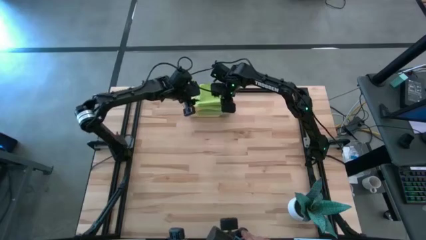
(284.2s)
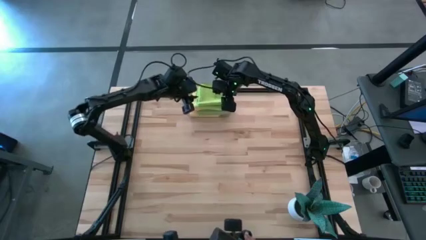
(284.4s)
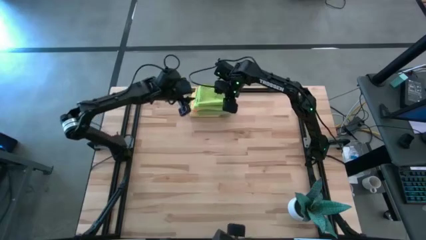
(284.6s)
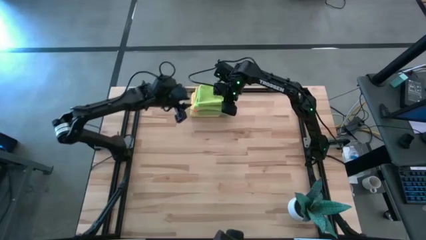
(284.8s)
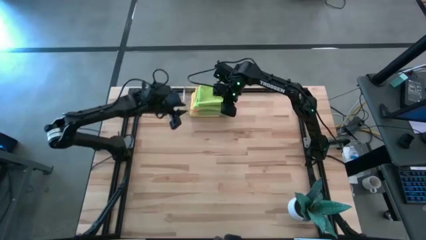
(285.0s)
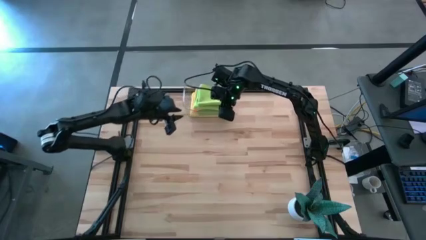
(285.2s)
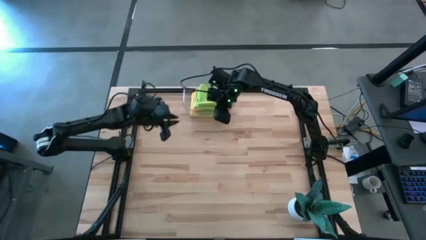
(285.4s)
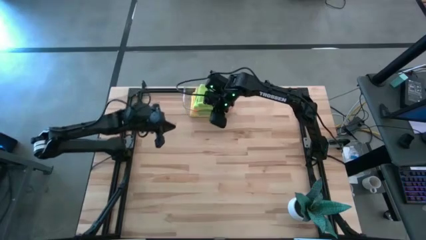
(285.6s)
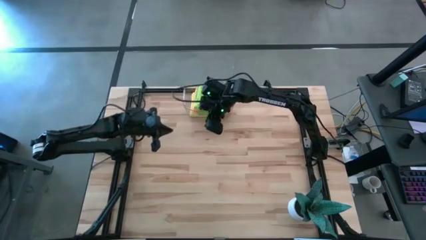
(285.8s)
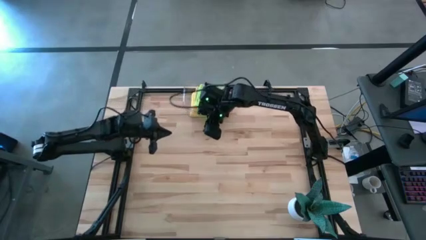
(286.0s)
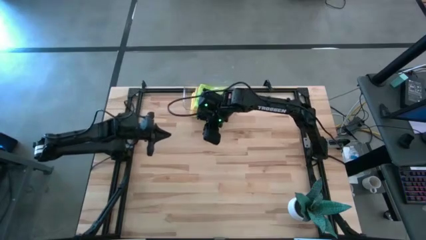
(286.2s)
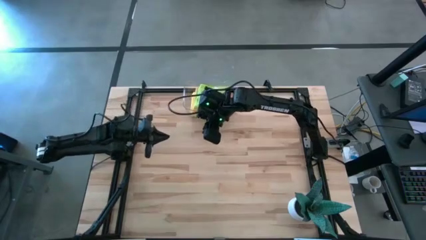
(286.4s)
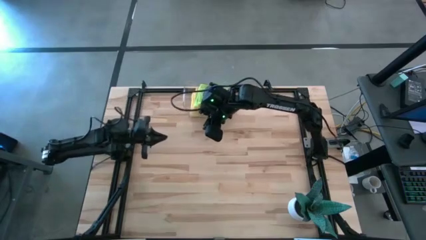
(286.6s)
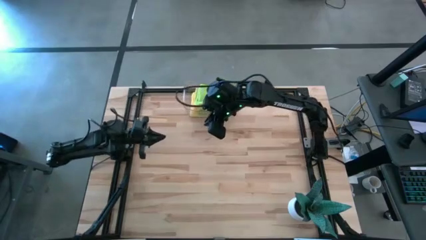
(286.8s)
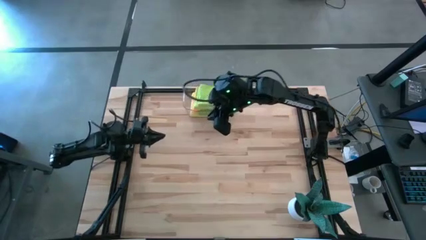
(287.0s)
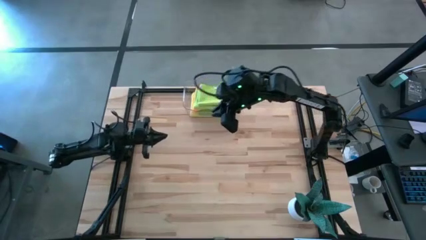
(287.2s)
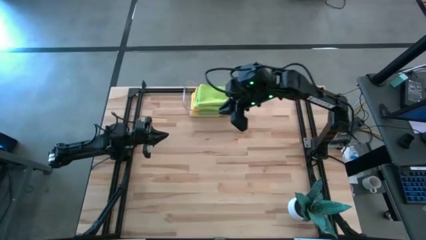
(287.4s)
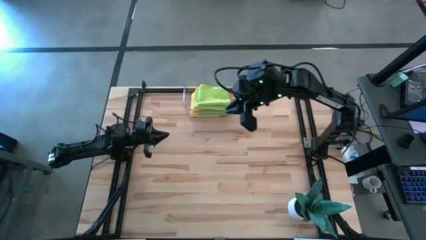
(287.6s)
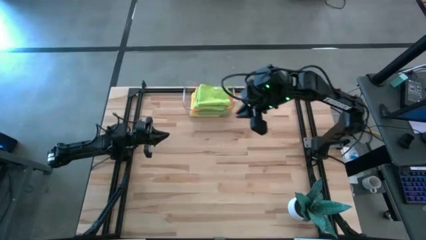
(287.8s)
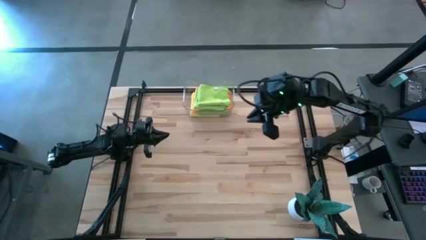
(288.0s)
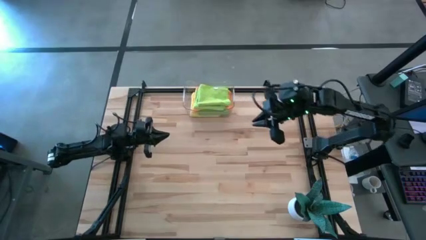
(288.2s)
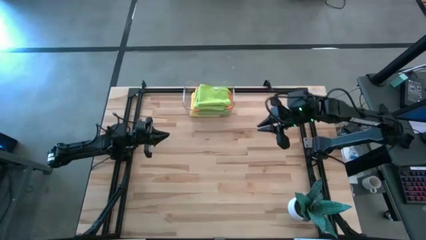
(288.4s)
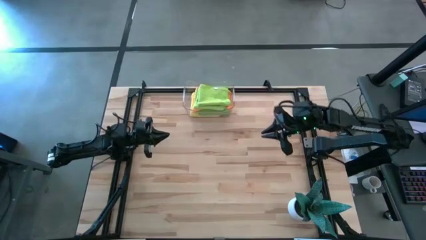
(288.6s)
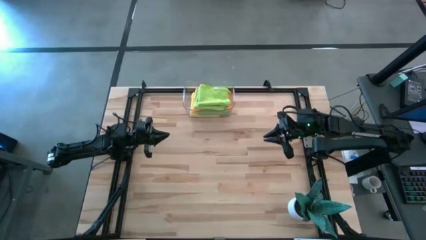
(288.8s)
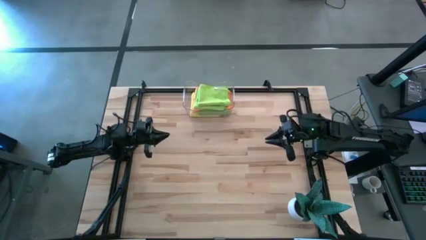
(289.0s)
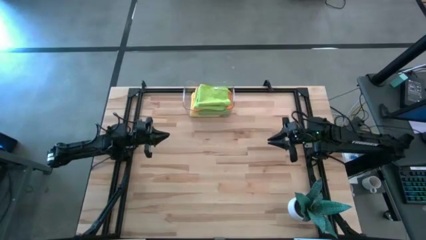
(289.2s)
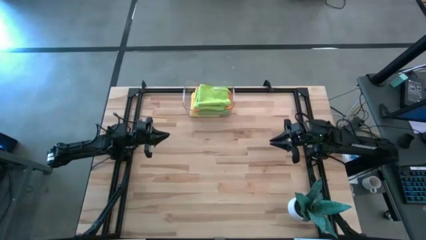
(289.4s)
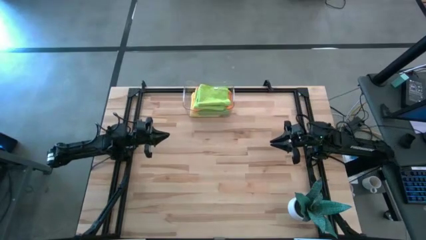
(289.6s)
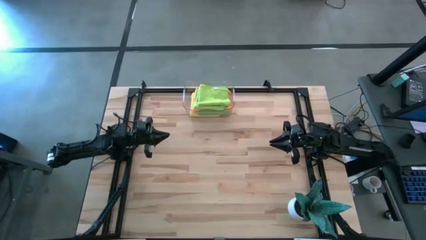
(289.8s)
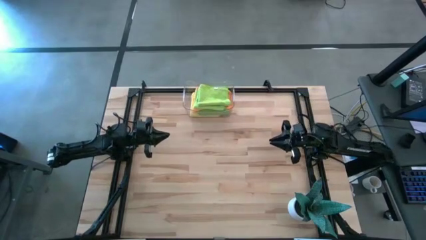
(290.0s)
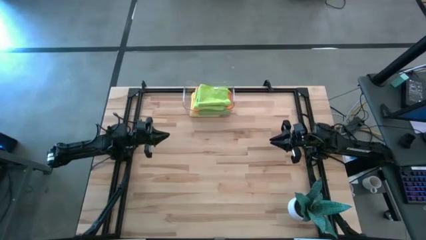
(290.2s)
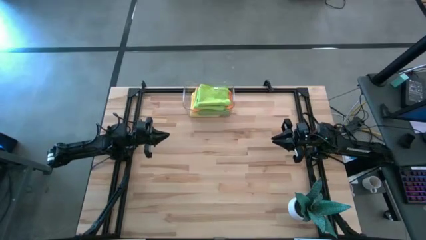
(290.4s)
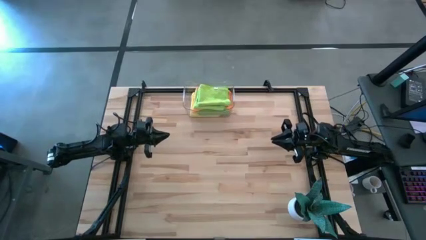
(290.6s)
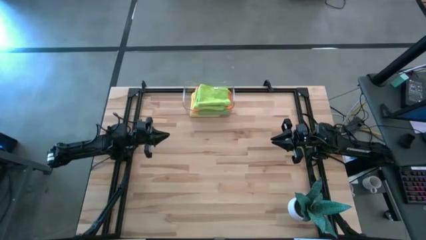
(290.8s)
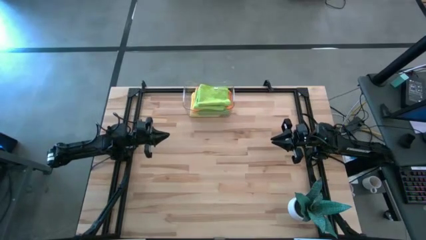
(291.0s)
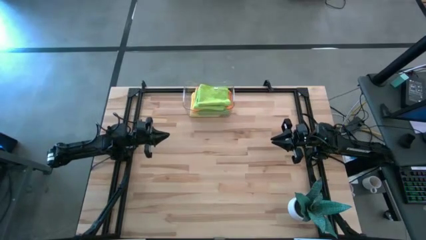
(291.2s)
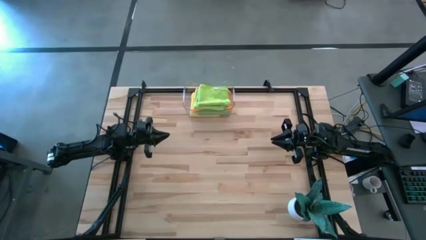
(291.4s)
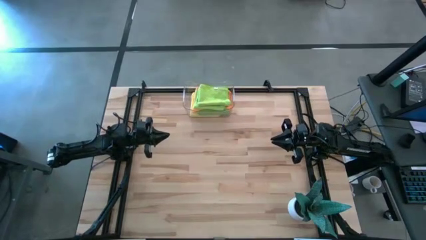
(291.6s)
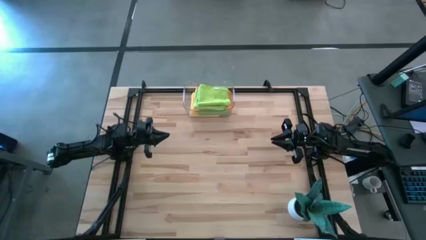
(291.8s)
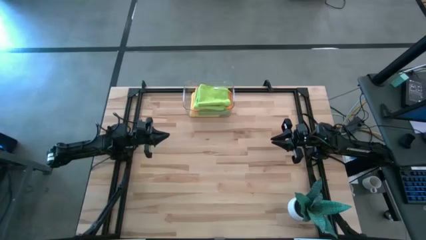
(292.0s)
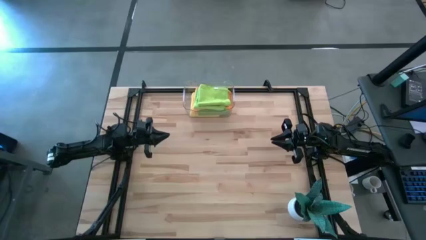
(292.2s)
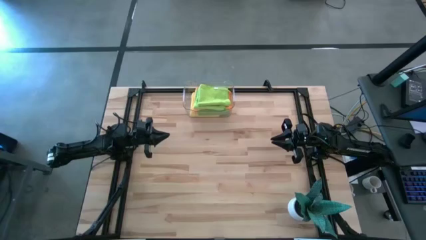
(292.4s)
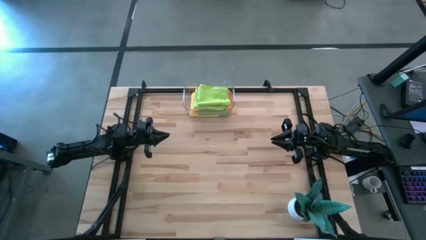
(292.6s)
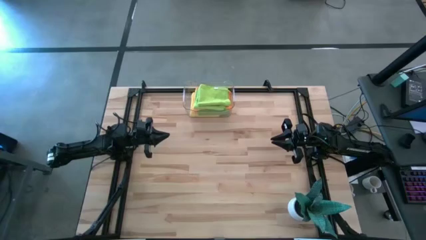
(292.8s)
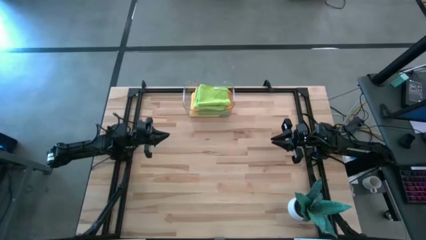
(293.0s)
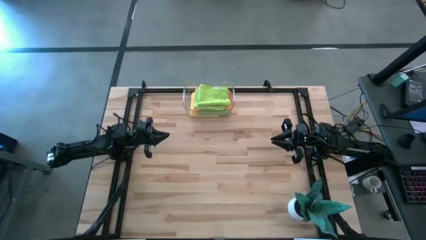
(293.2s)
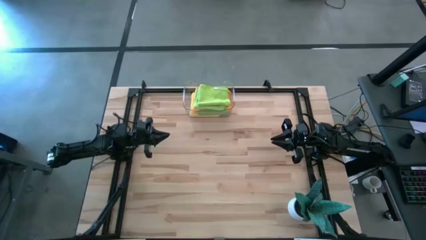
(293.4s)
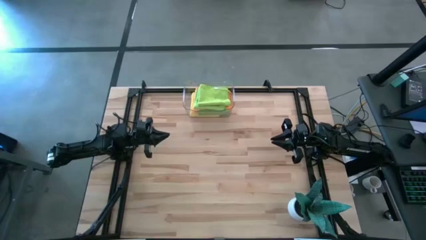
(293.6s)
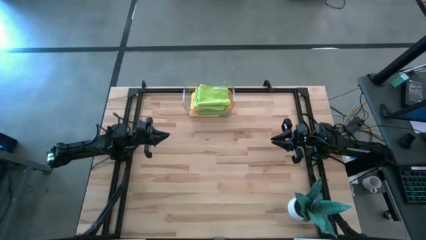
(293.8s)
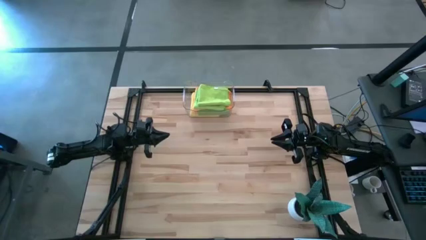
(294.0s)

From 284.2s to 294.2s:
Task: Fold microfiber towels
Return to Home Position

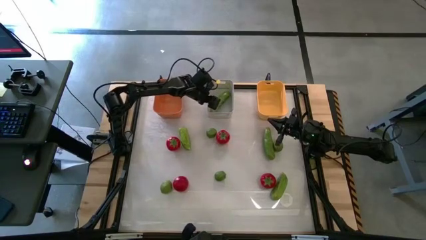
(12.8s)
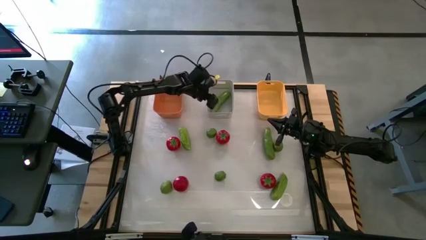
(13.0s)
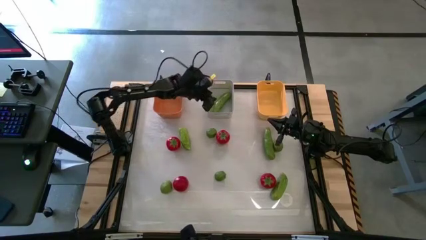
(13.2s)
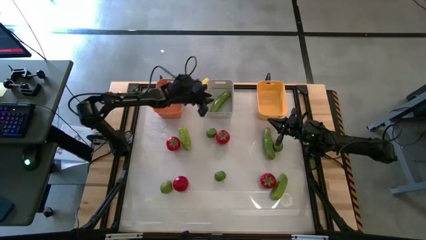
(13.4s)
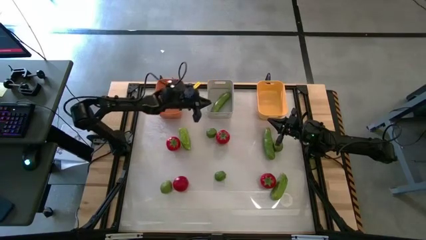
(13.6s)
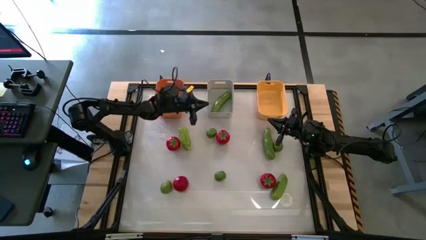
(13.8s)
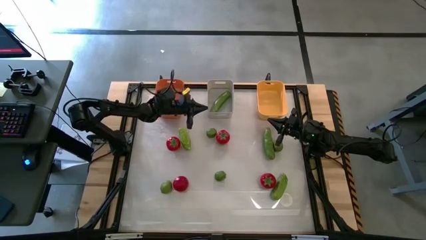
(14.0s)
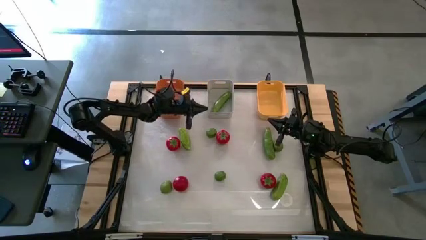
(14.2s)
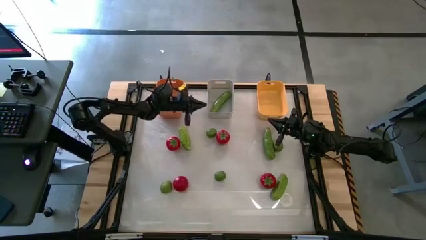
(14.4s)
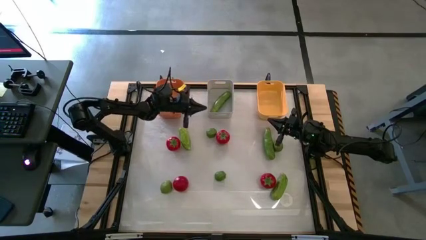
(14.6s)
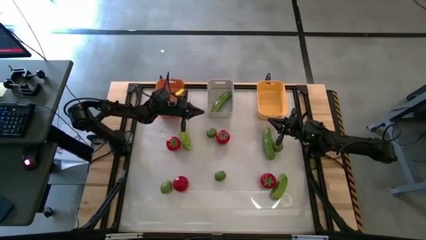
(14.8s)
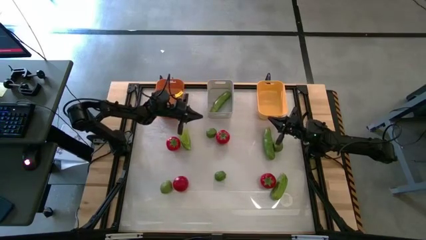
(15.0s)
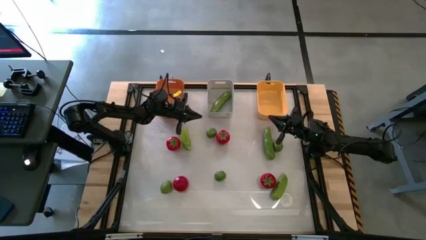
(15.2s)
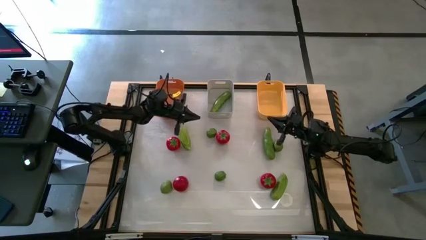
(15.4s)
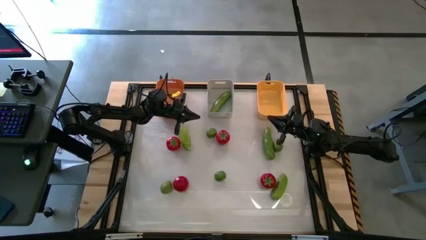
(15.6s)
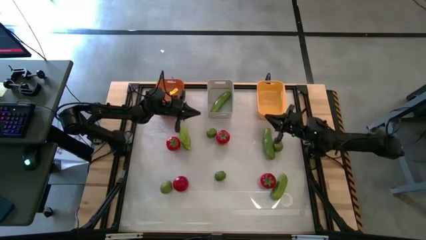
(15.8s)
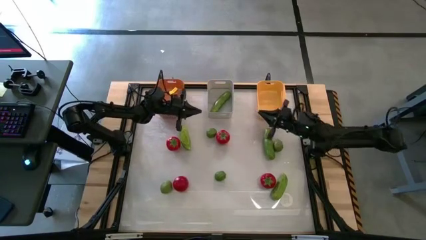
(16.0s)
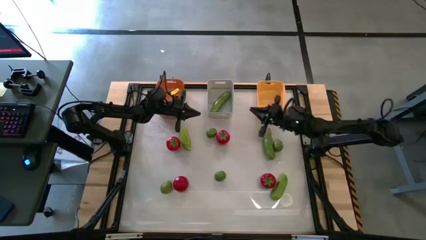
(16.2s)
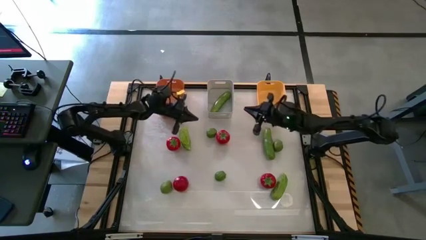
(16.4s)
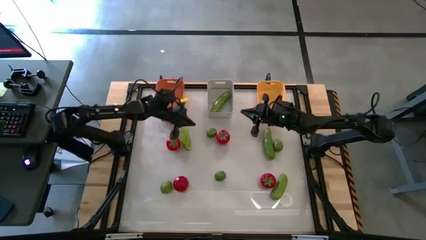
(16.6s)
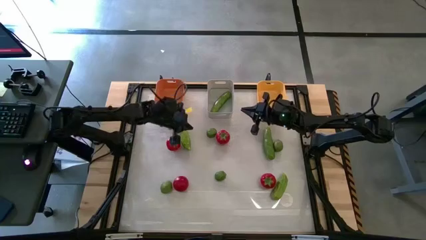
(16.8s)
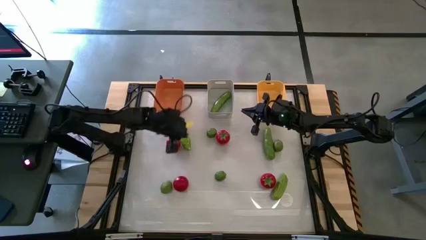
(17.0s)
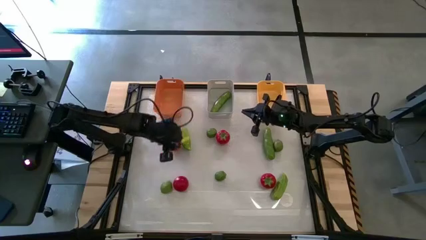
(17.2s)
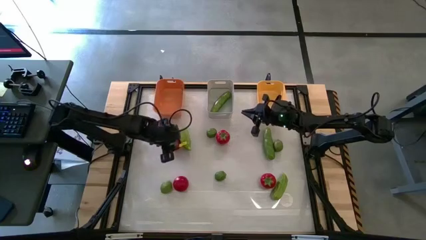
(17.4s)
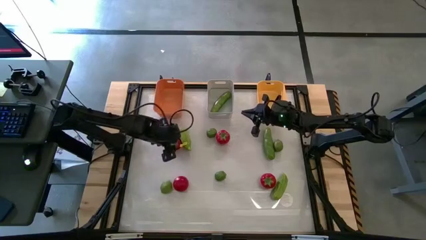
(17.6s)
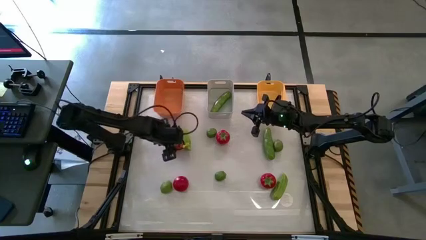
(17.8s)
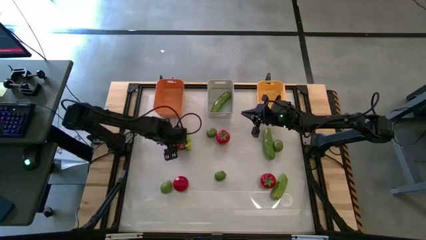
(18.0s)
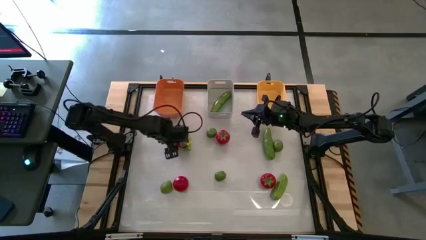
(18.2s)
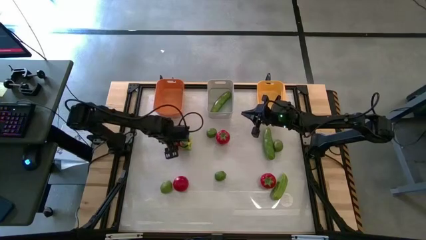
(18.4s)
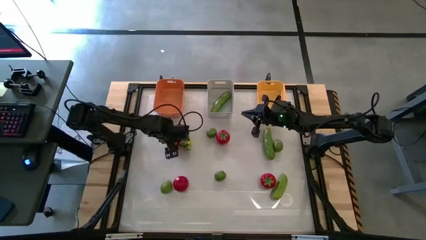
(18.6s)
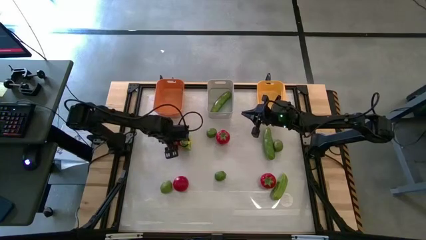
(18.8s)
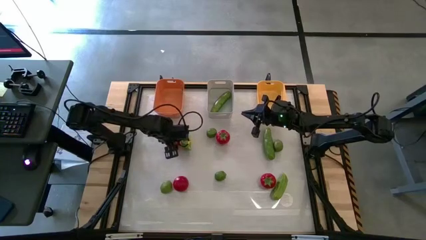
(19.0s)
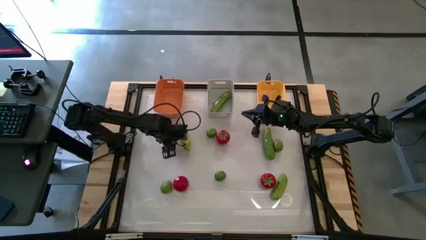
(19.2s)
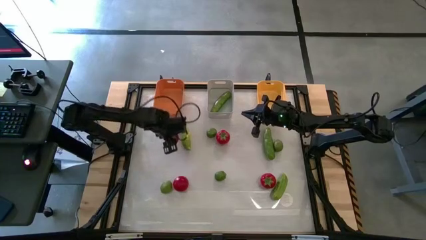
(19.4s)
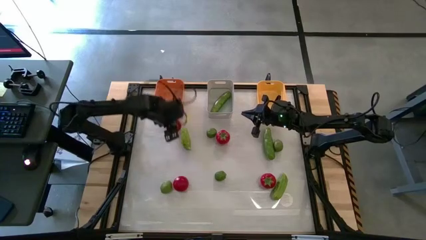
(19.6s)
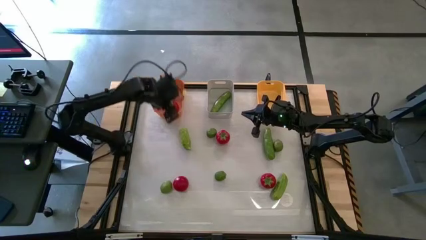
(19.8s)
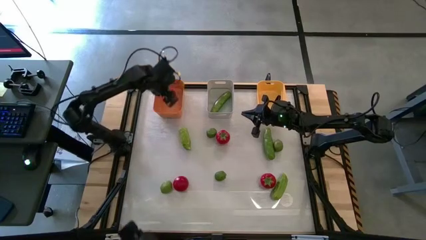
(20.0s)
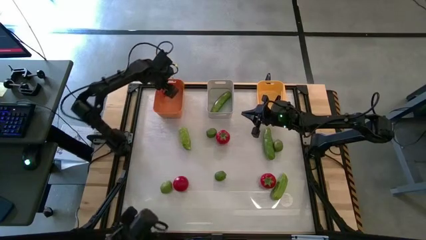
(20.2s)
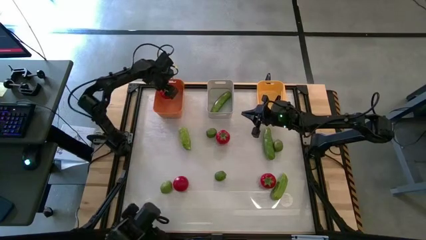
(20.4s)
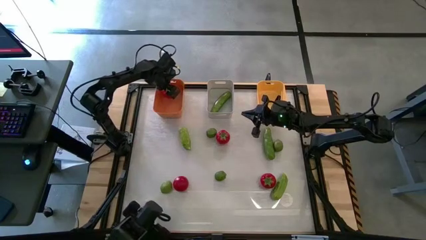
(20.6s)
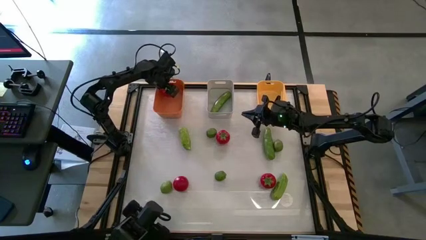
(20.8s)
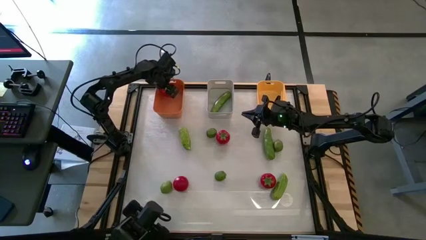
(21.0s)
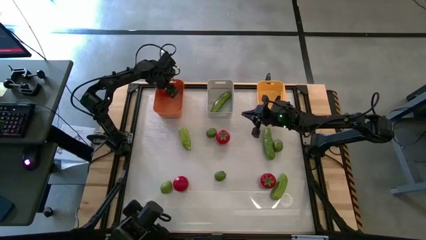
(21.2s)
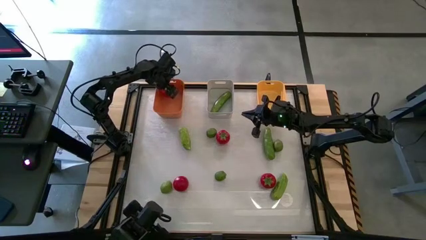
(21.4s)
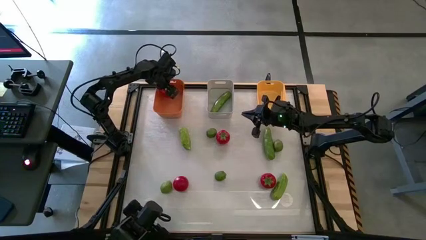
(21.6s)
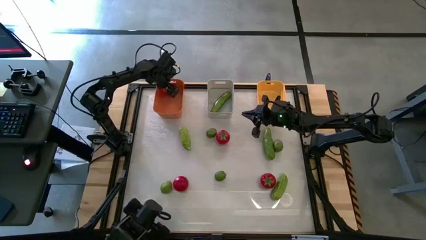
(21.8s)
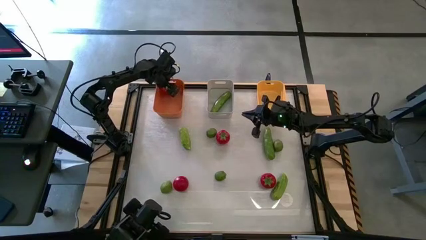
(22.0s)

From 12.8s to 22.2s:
Task: Sort produce into baskets
Put the top left tomato into the orange bin
